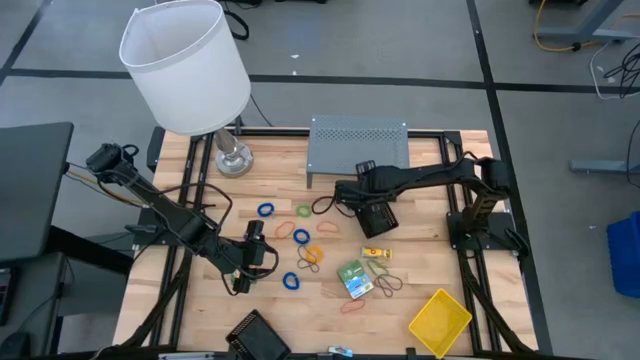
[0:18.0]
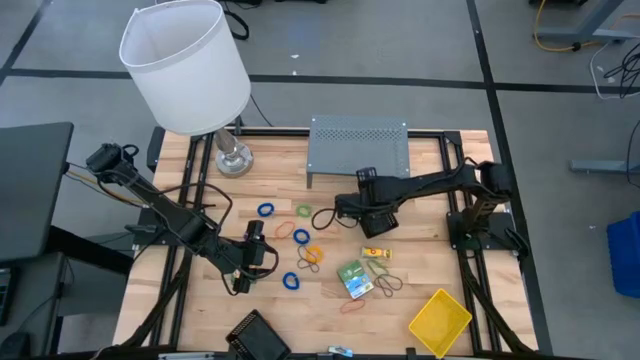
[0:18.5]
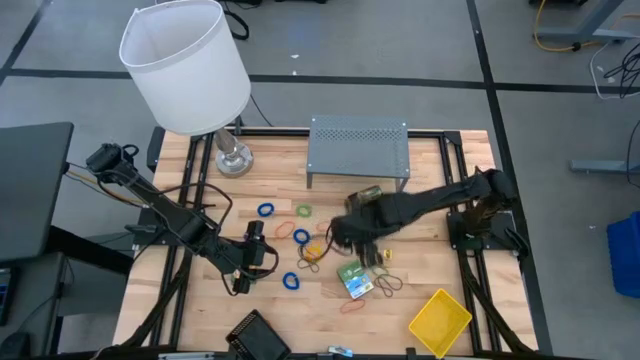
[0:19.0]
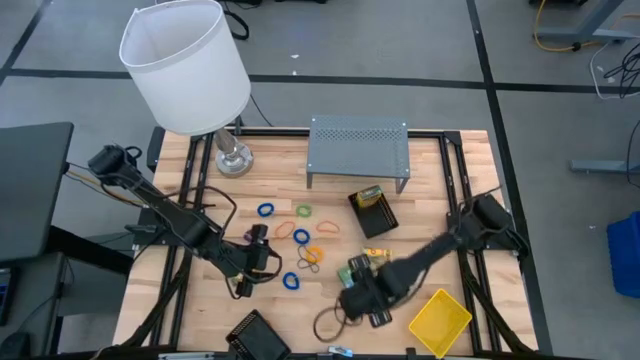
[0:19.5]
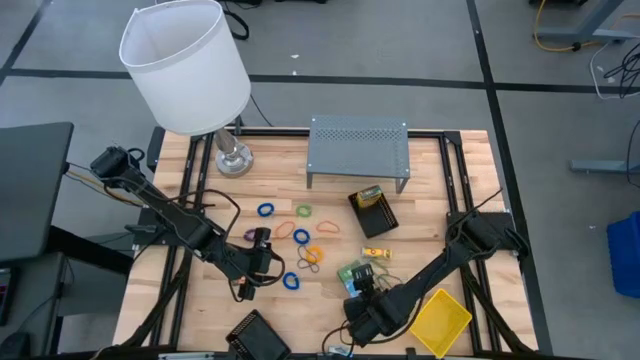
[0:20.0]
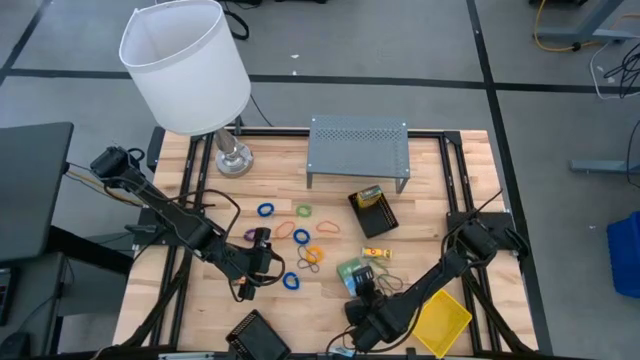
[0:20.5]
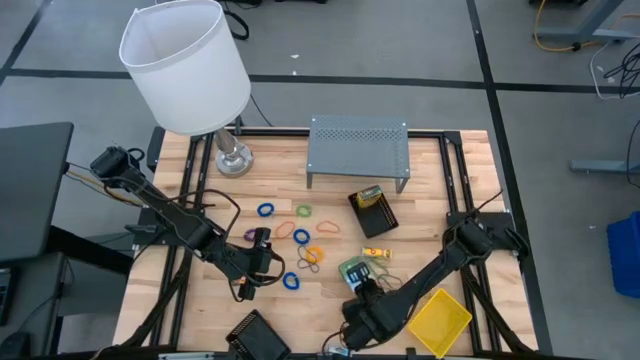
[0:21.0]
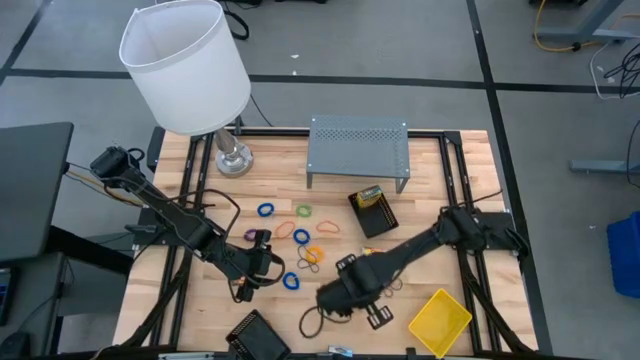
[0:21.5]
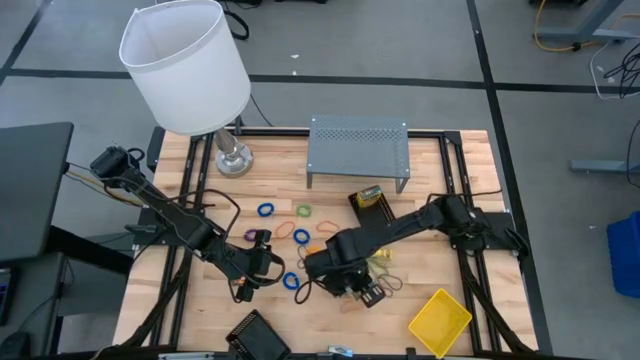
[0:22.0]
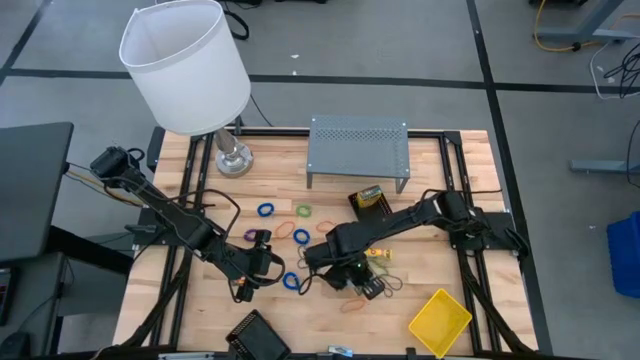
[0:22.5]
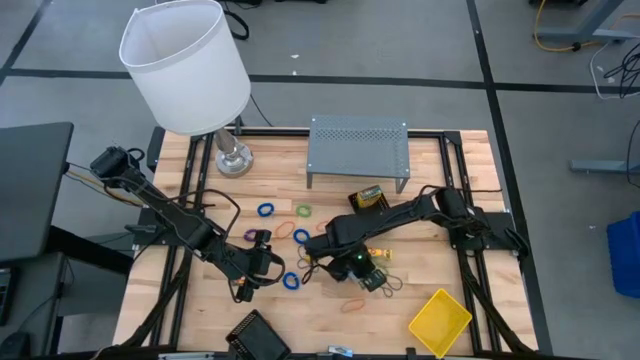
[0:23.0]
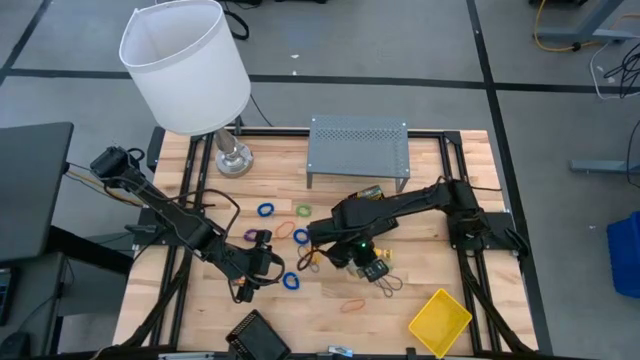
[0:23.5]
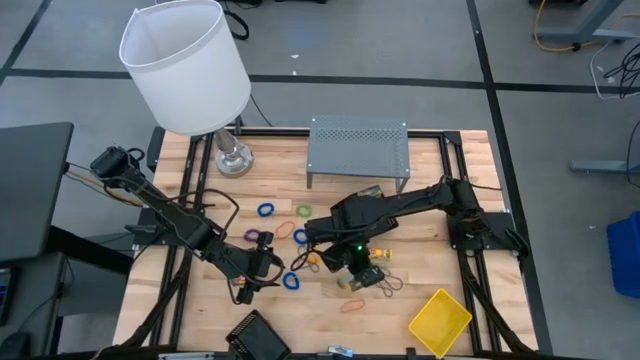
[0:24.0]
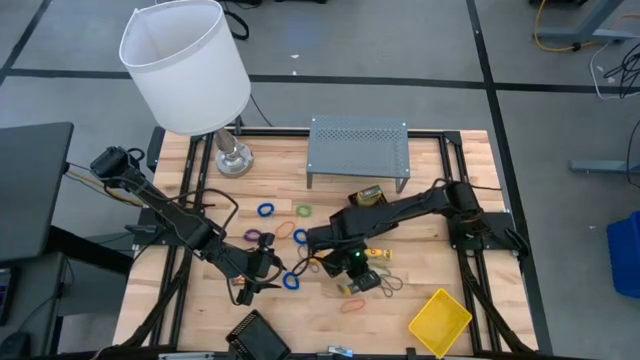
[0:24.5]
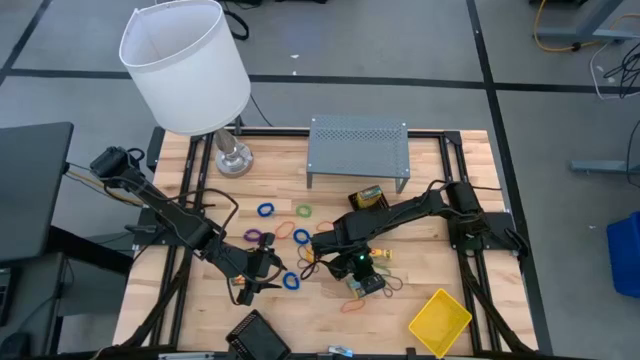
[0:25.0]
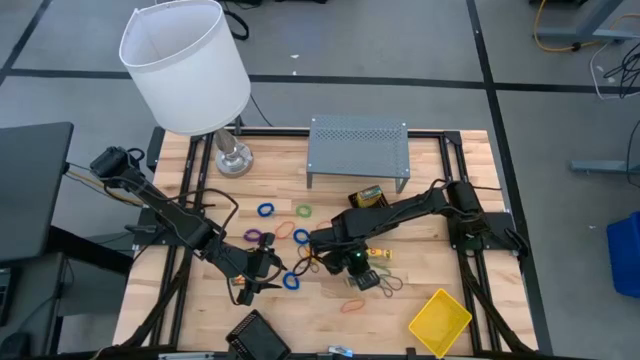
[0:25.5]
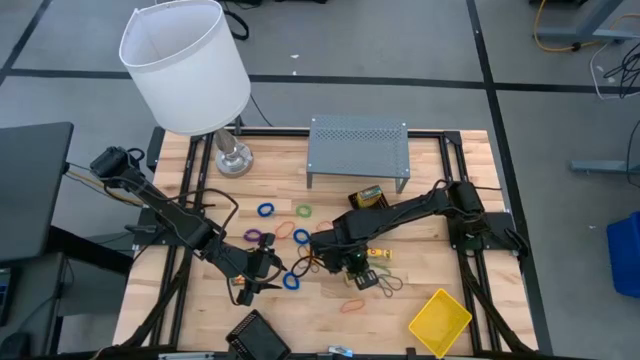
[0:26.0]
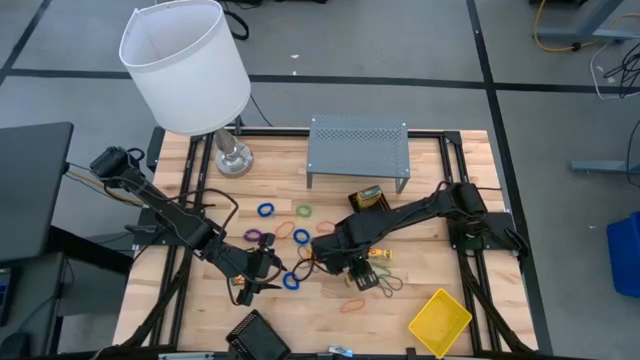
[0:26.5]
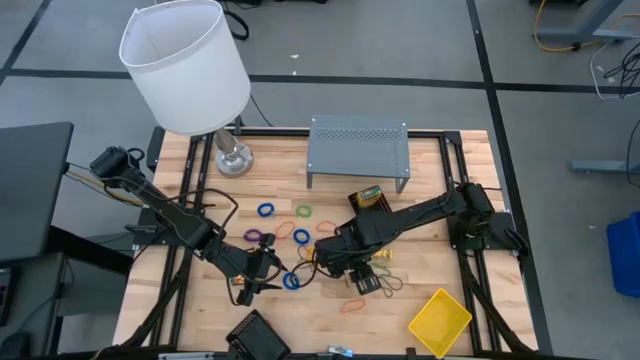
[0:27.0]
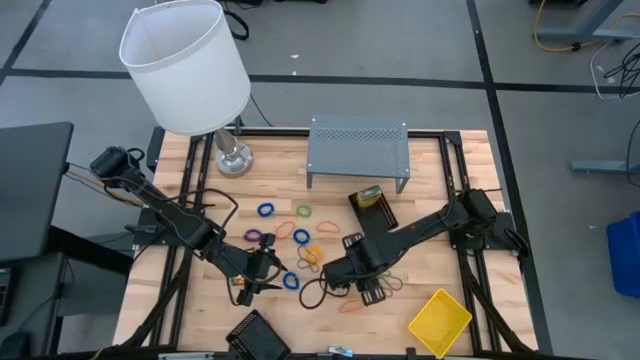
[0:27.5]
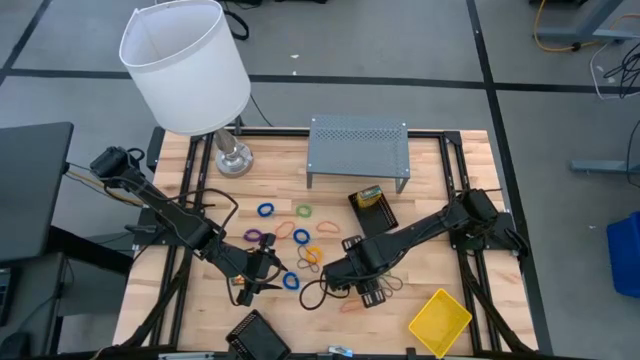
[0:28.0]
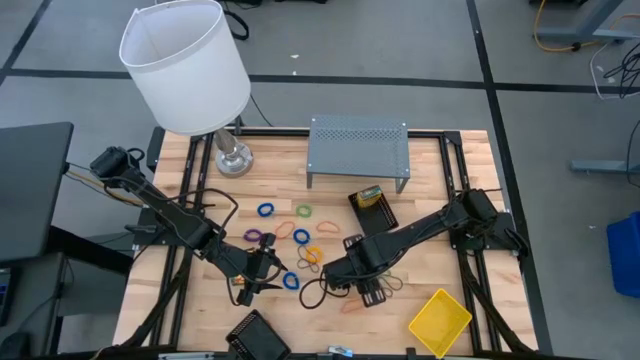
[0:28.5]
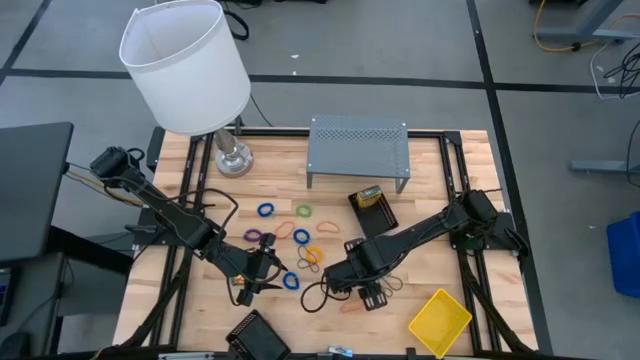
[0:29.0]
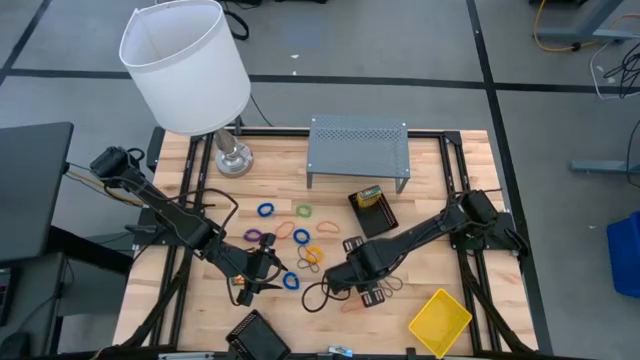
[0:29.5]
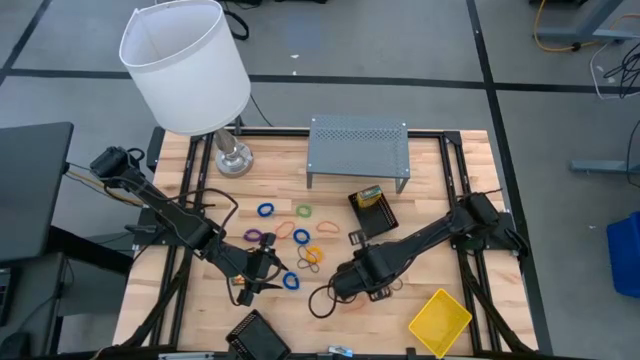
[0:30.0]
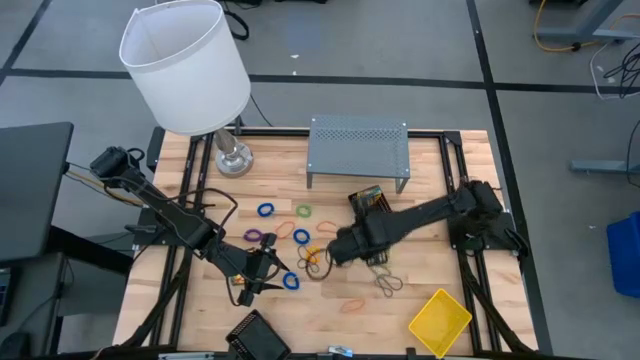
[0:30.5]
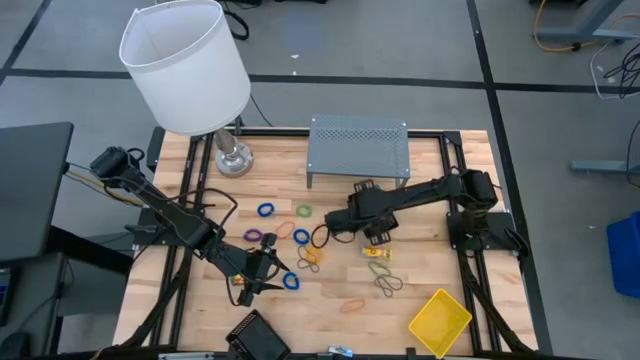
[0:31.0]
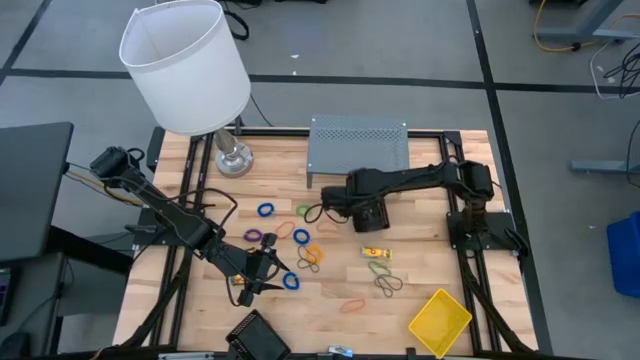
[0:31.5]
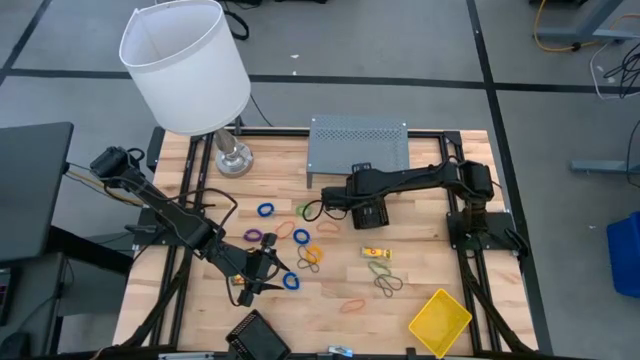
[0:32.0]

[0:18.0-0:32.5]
Task: Pick & Place Office Desk Supplies
Put the yellow crayon box into the top black bin

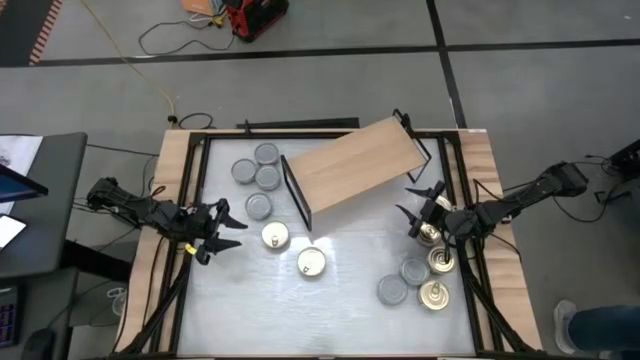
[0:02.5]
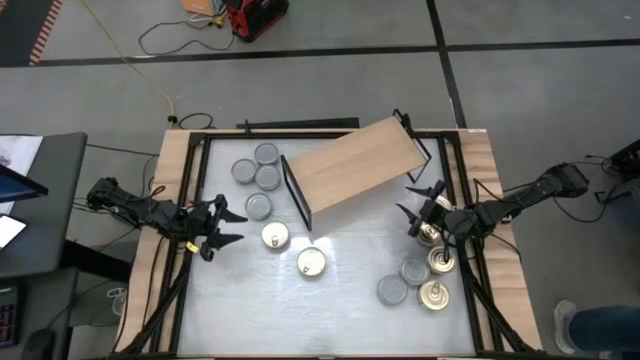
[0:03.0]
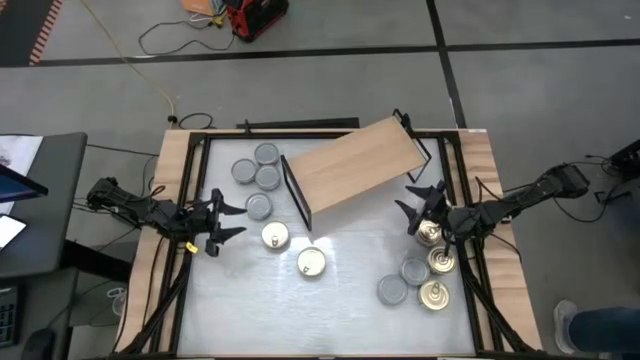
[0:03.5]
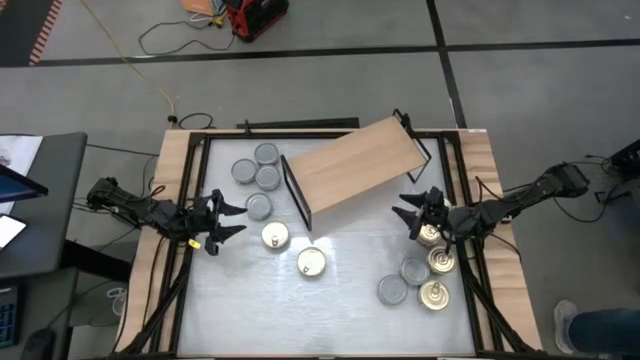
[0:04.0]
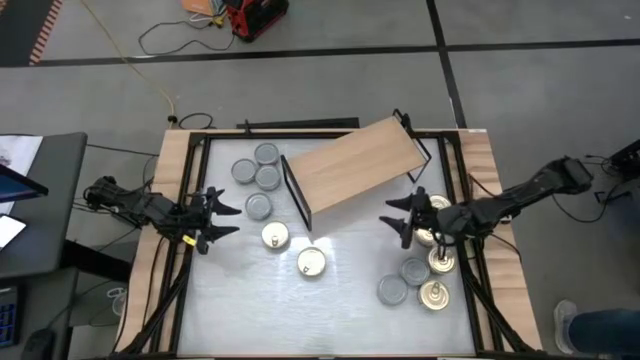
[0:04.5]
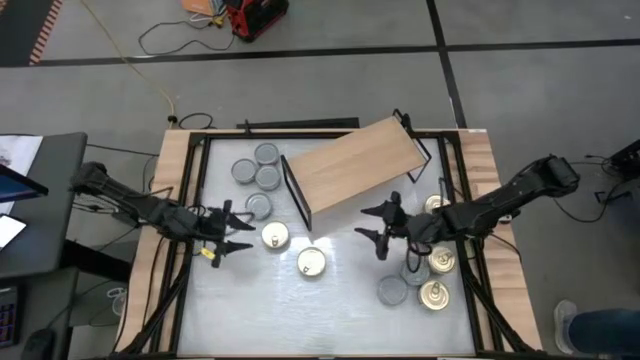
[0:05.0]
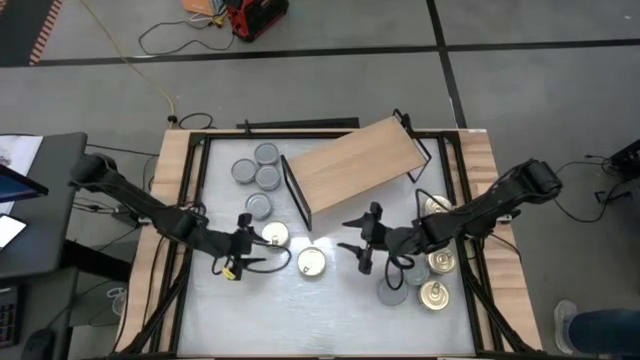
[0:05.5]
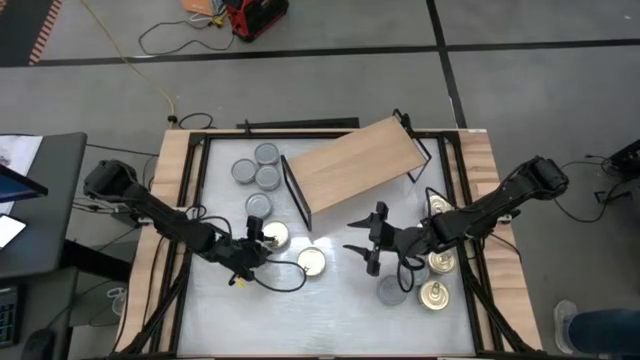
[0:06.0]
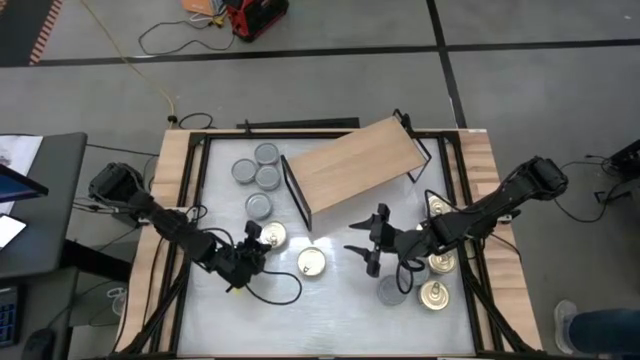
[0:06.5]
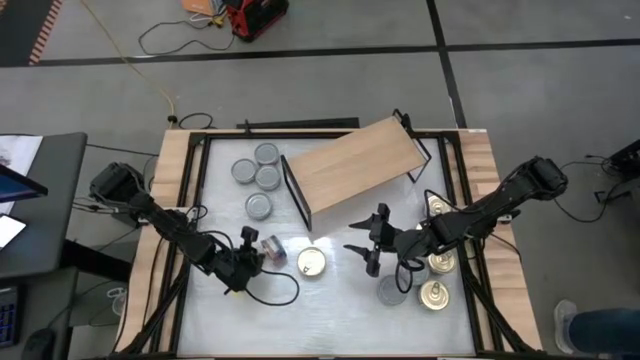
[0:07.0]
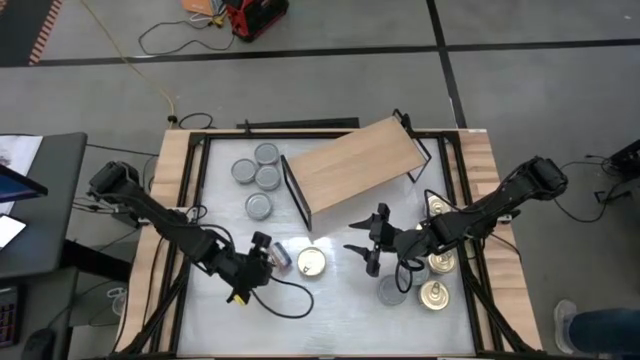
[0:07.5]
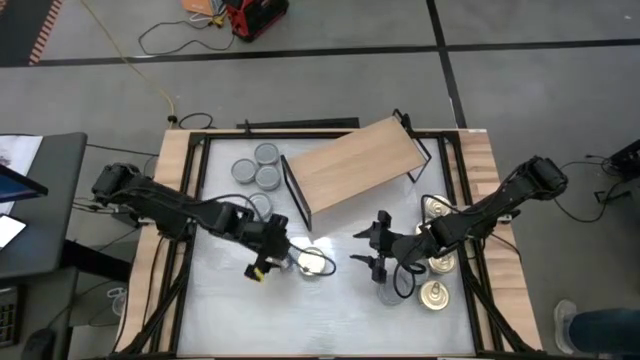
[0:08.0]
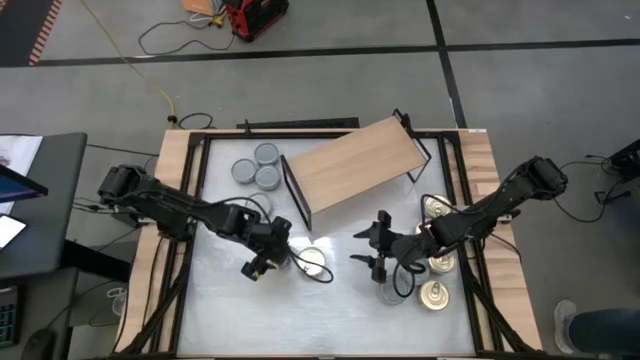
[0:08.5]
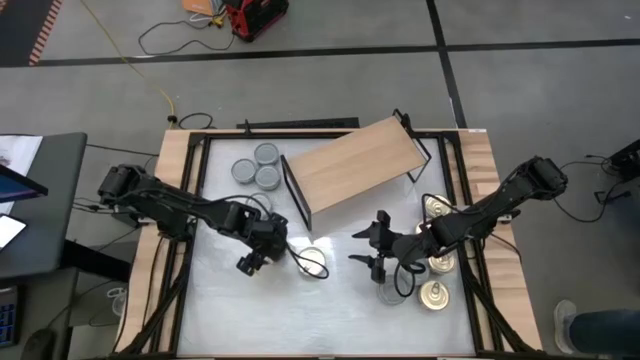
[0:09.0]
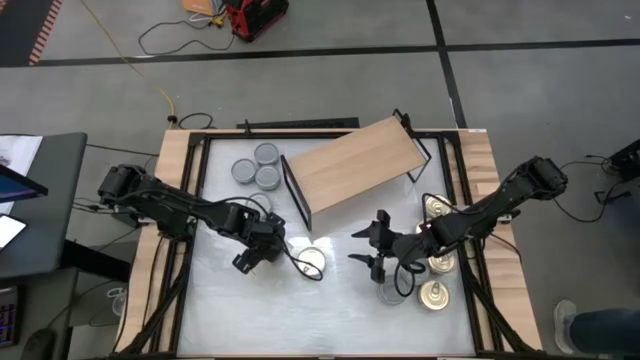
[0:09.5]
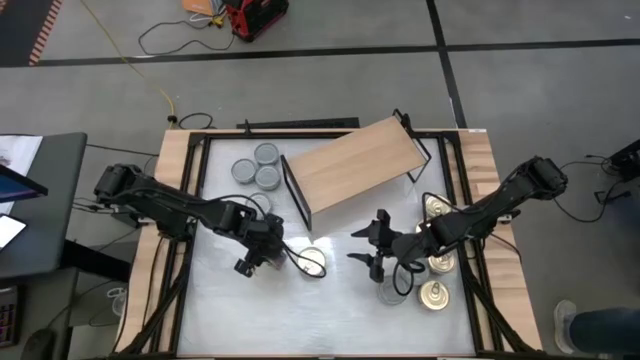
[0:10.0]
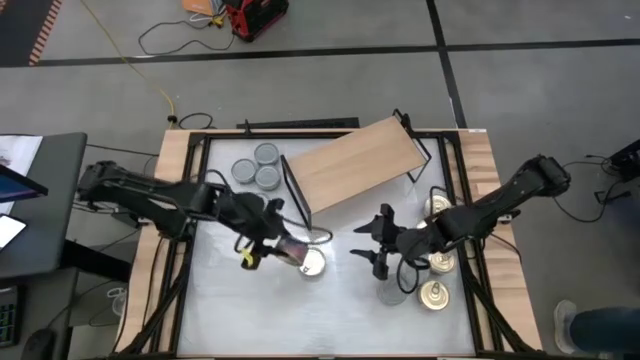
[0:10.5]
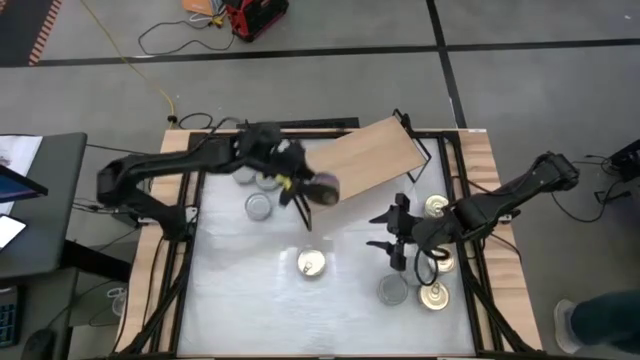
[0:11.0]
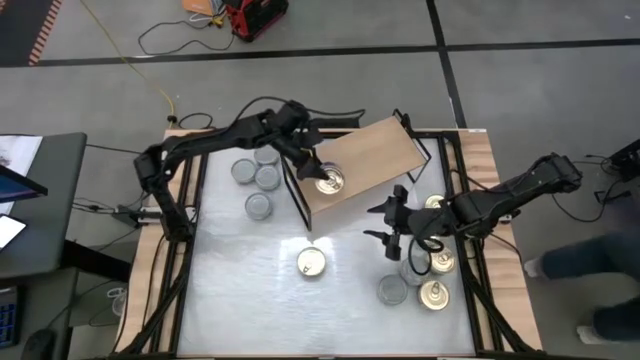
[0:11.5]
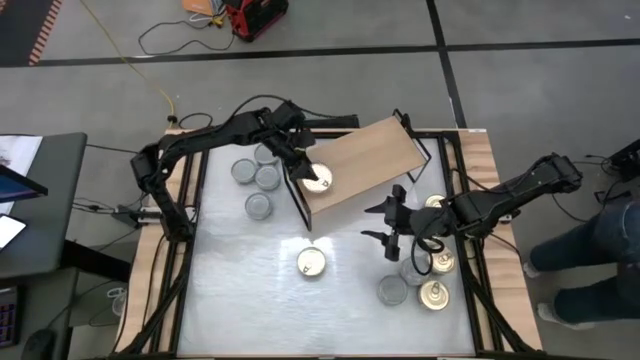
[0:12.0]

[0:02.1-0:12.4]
Task: Stack canned seafood by type on shelf
Put the blue tuna can on the shelf
